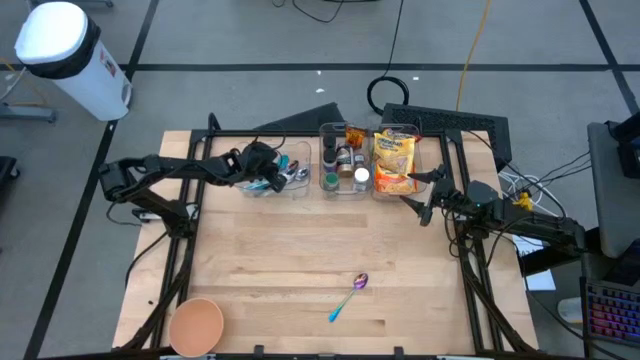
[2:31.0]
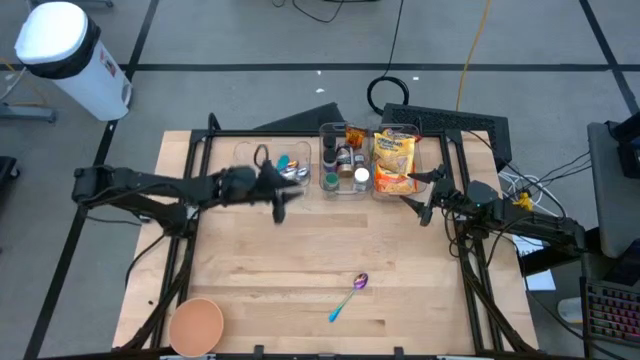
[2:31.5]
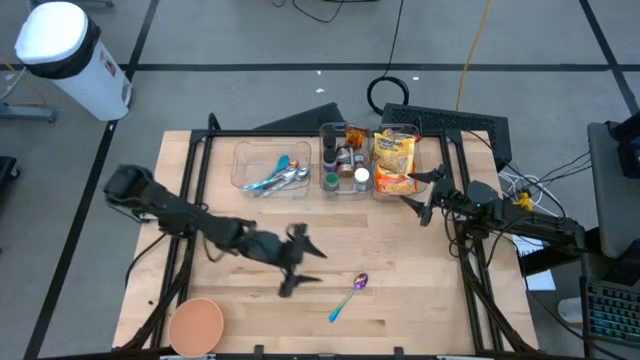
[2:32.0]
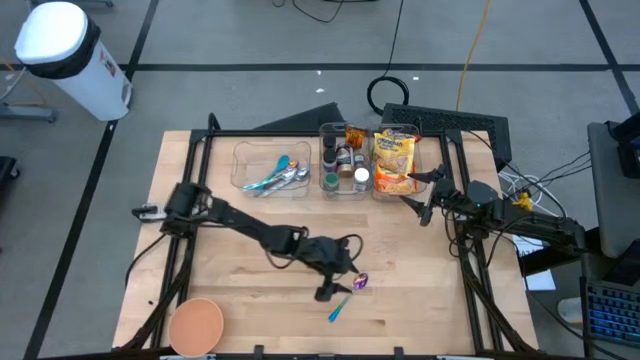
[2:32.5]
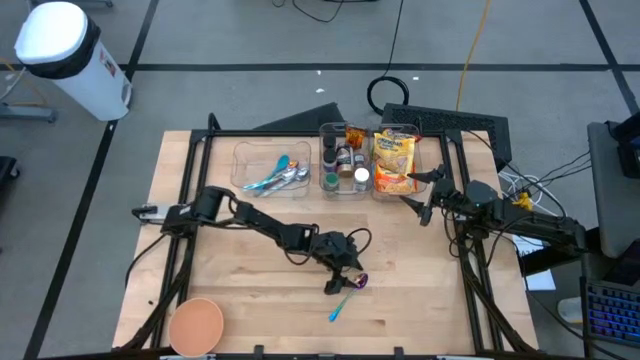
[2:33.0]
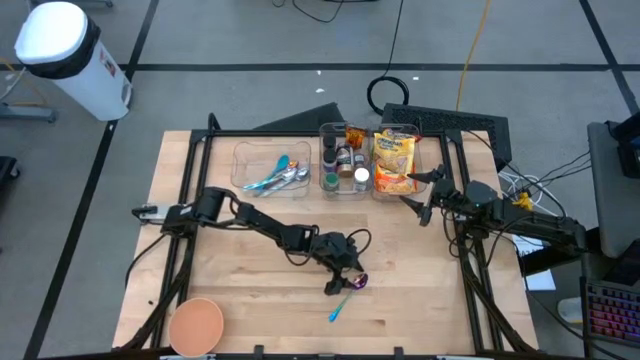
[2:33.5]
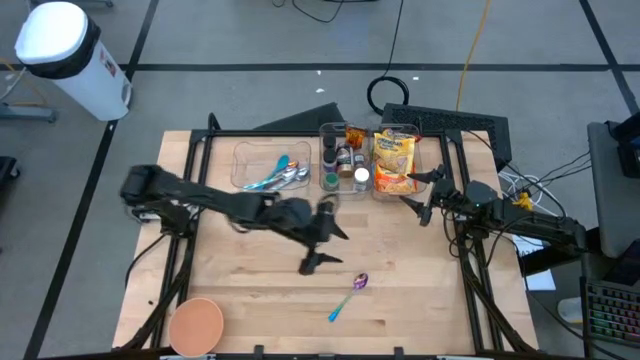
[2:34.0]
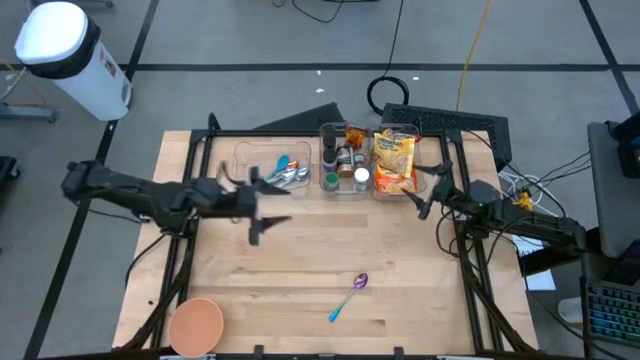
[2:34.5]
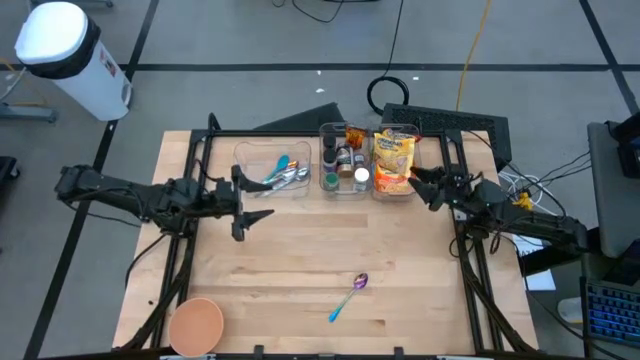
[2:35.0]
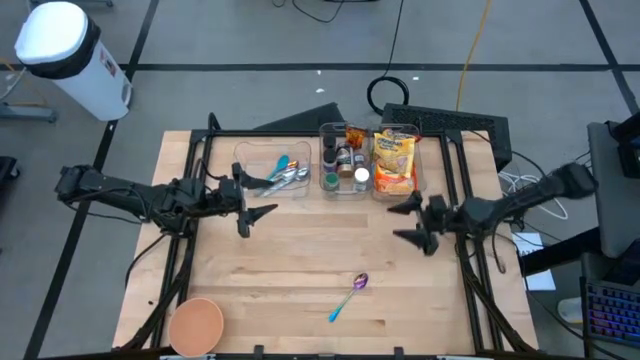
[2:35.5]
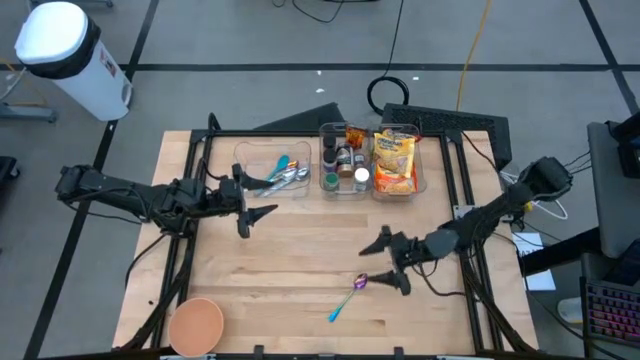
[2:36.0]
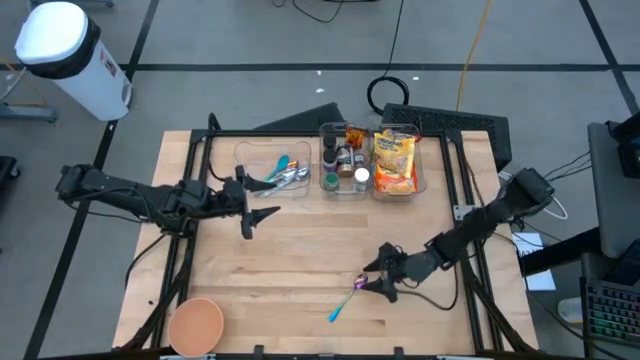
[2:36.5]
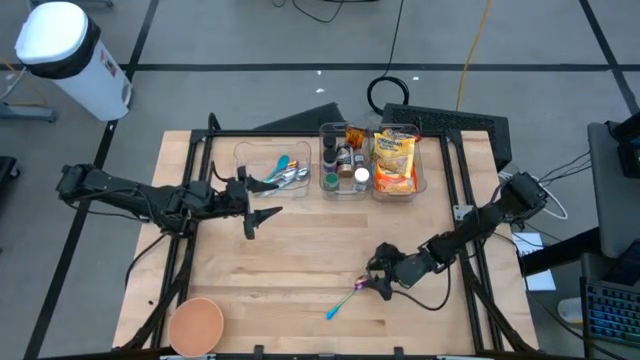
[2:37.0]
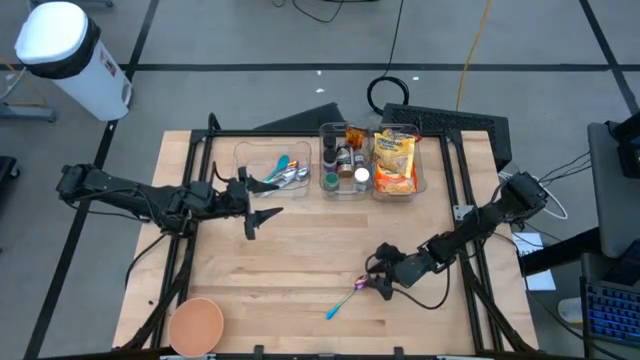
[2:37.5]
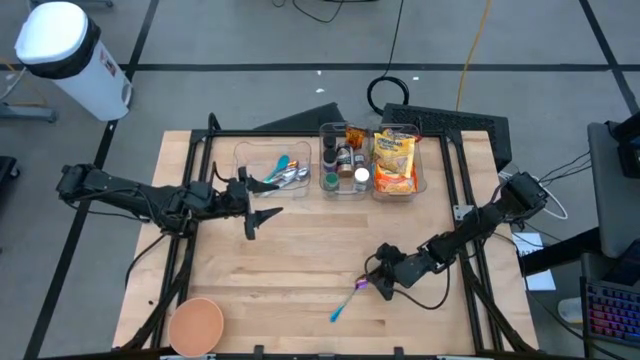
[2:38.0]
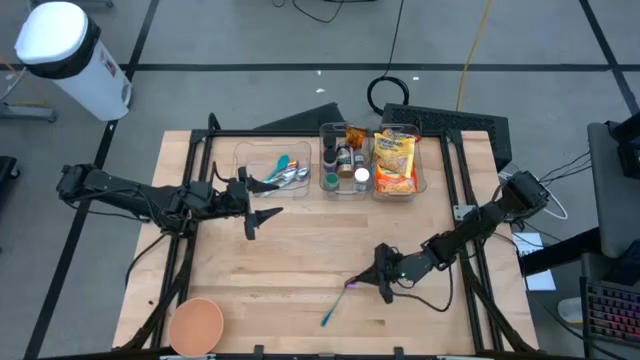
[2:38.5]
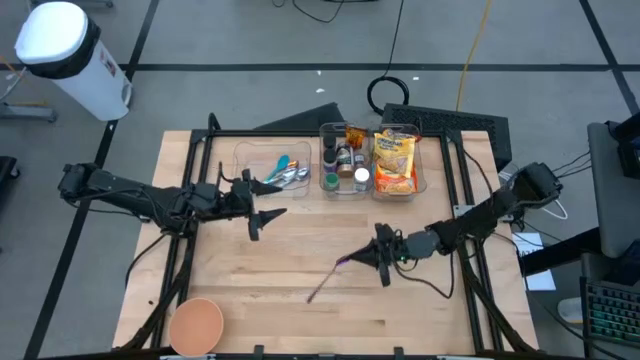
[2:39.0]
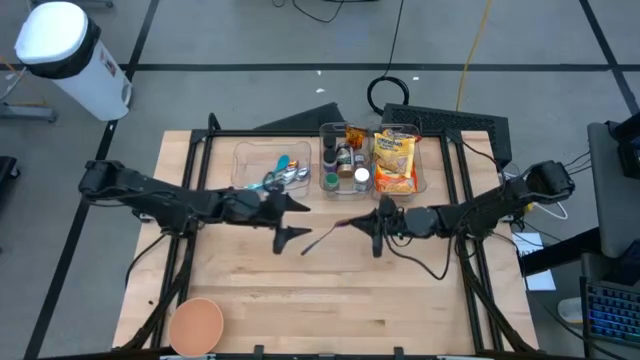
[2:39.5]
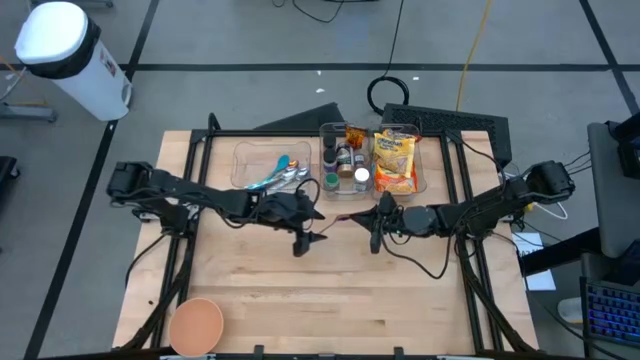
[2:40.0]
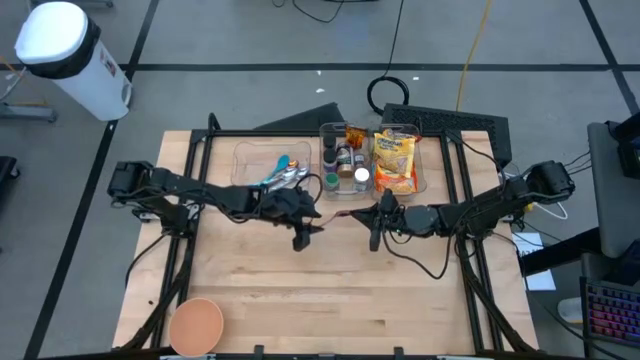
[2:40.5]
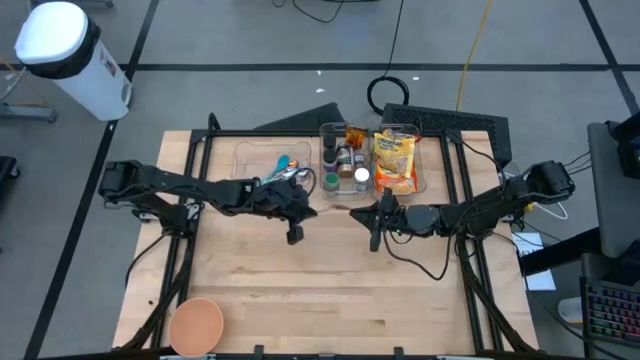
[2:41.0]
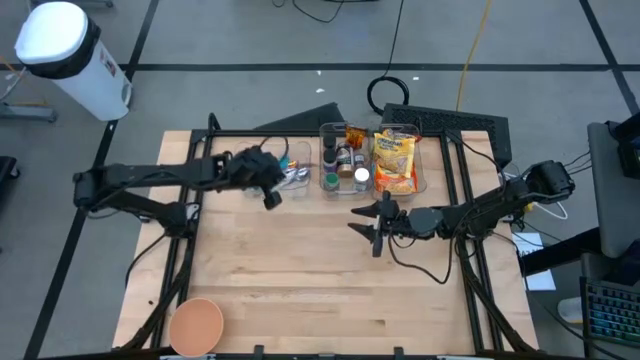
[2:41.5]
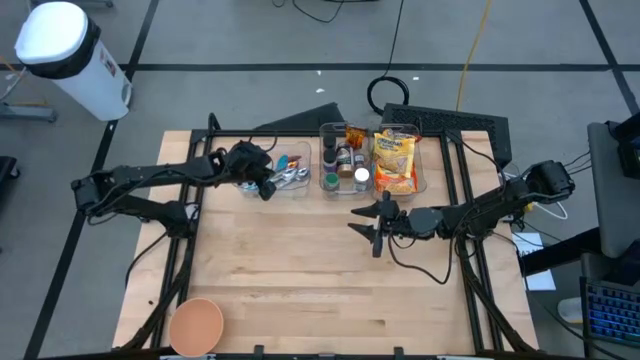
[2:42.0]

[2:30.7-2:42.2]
Task: Pick & Place Food Item
Put the blue and violet spoon into the left transparent bin

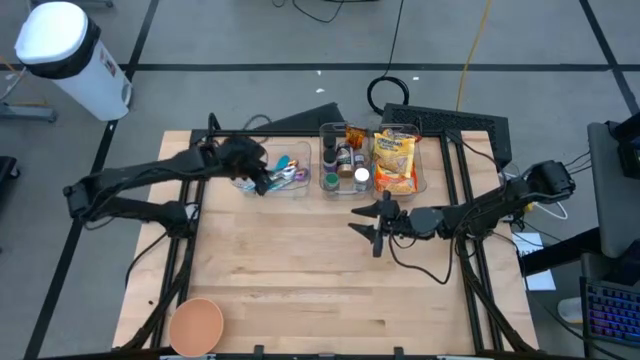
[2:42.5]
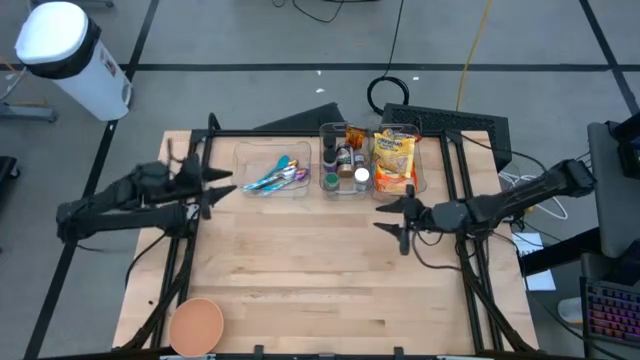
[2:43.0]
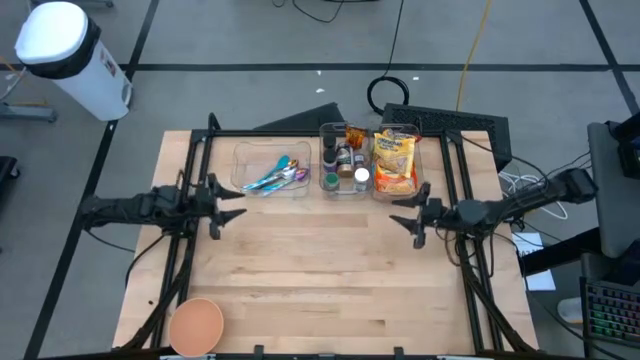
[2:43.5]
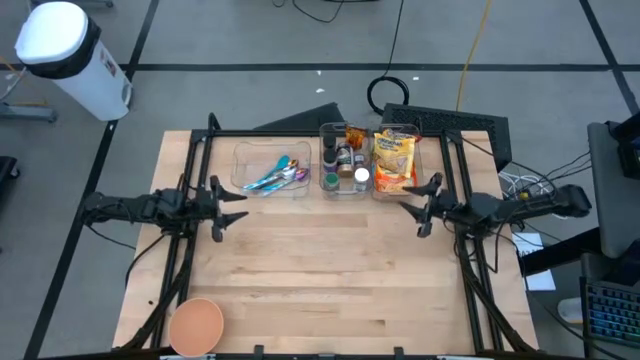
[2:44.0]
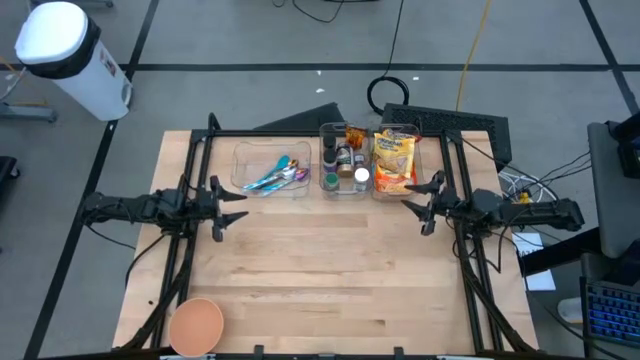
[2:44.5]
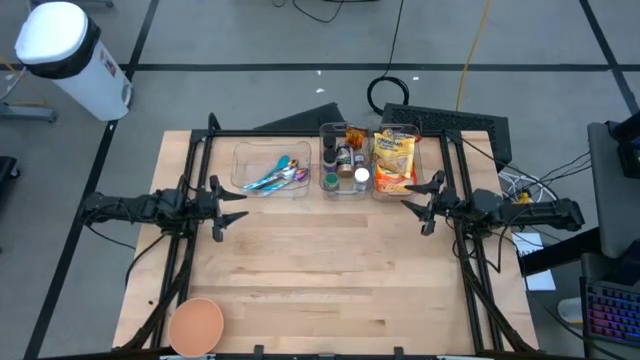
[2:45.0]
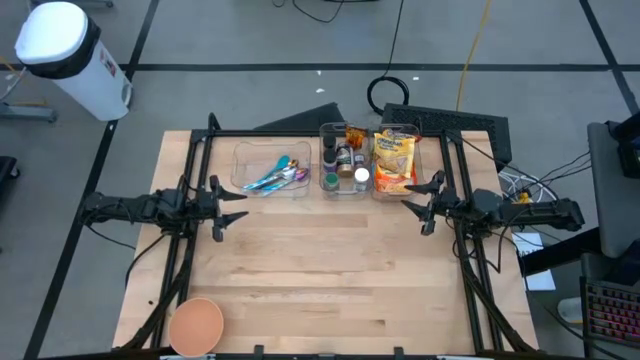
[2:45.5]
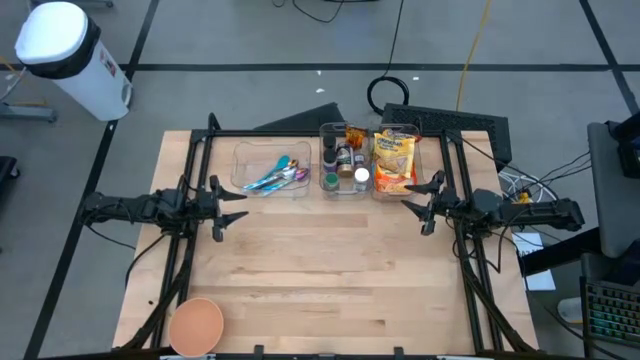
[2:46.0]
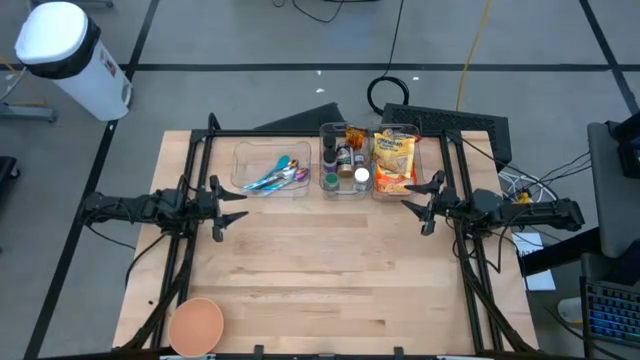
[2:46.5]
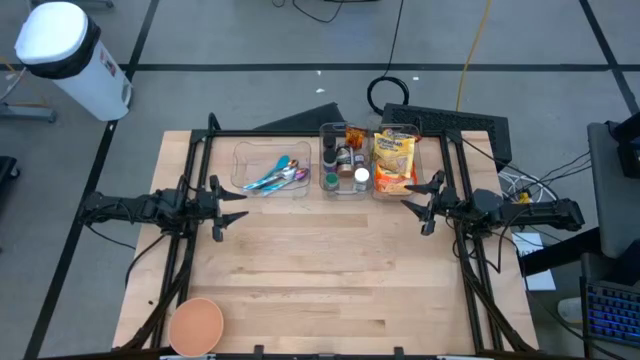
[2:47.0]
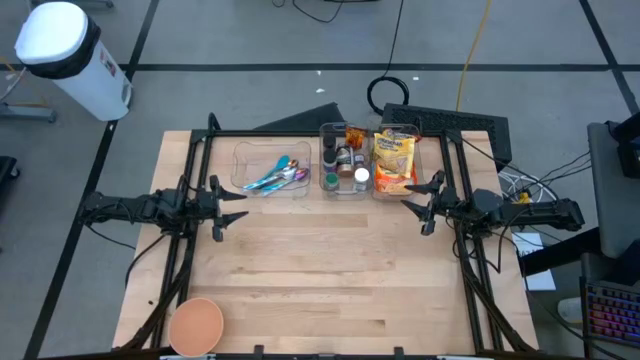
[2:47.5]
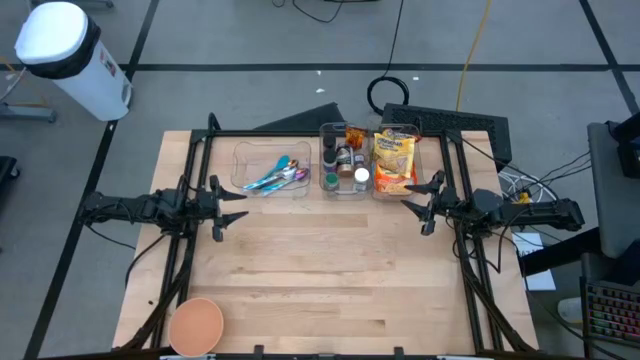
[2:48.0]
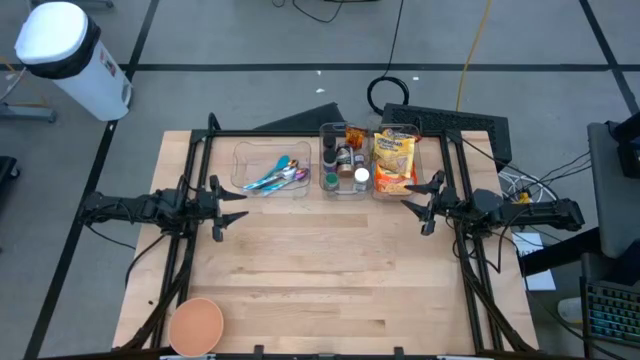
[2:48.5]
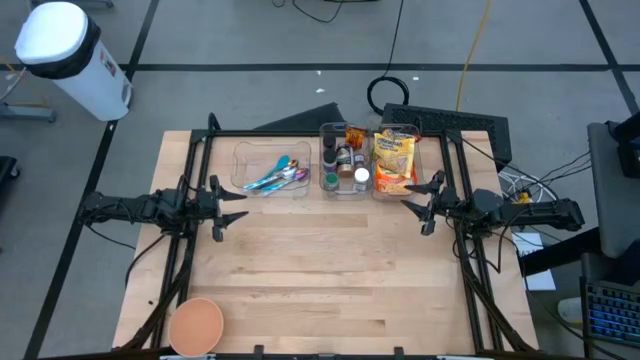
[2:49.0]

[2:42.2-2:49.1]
Return to Home Position

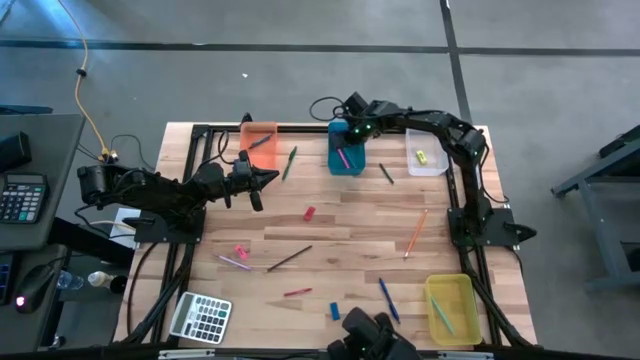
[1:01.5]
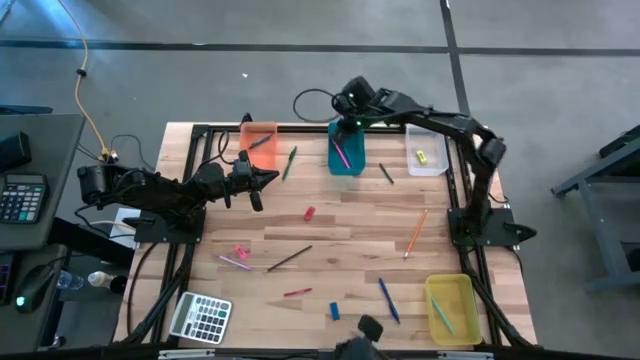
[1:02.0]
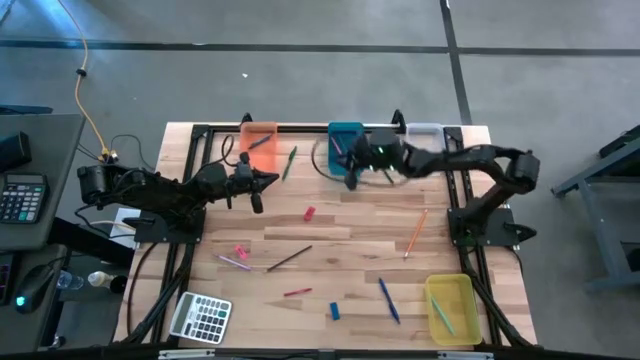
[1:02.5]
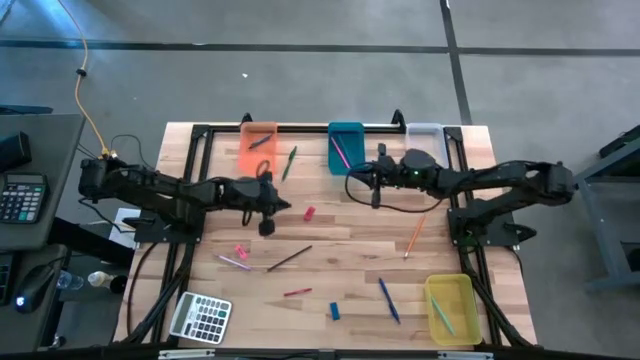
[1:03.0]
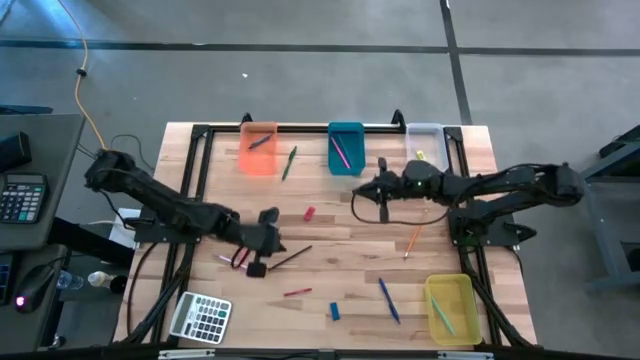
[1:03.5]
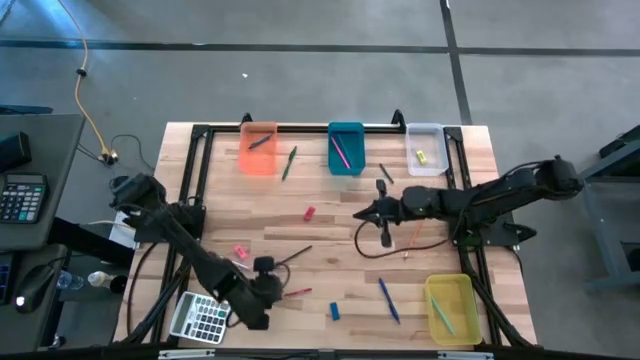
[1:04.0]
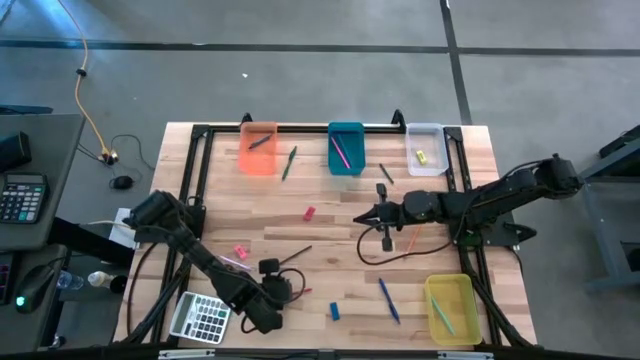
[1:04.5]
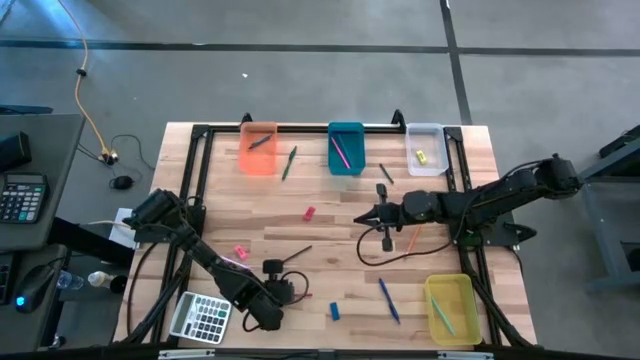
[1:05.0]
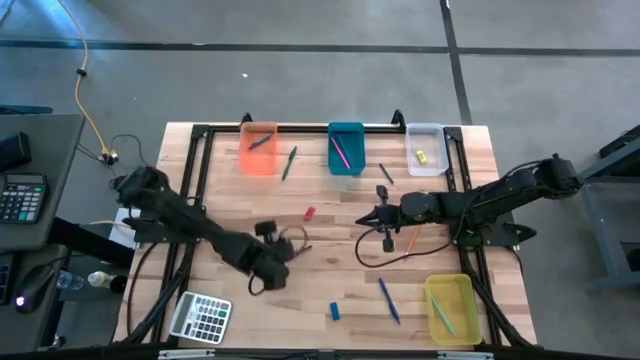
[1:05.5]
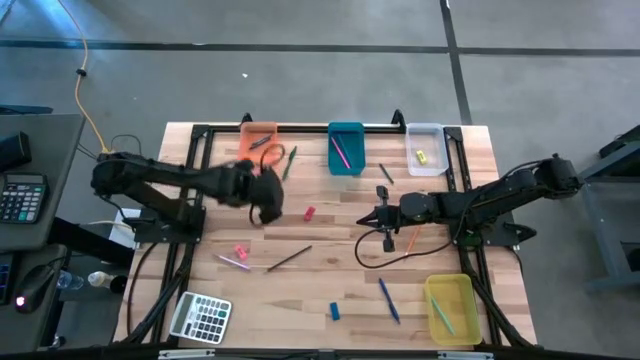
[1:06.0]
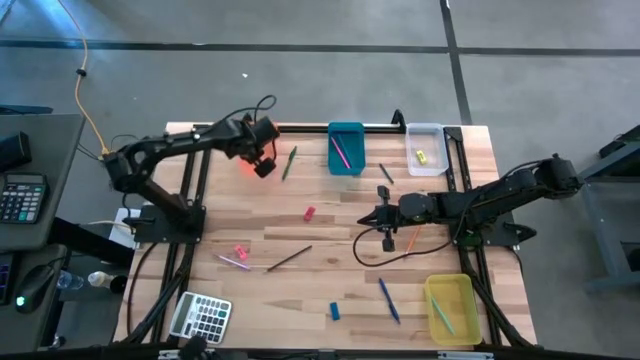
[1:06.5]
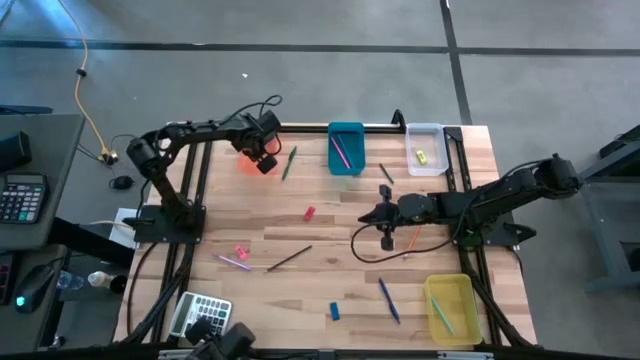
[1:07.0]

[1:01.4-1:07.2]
Task: Sort crayons/erasers/pens/pencils in bins
Put the red crayon into the orange bin
